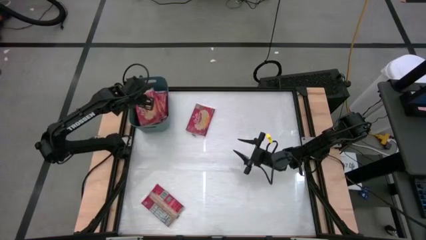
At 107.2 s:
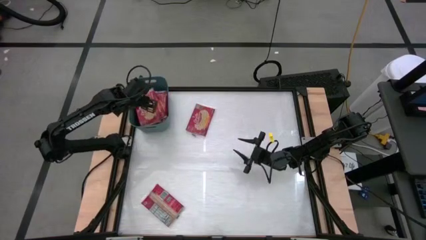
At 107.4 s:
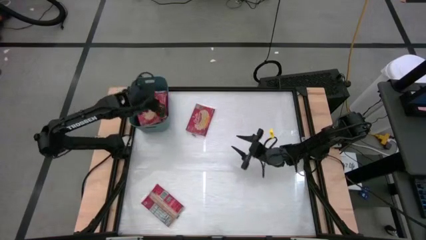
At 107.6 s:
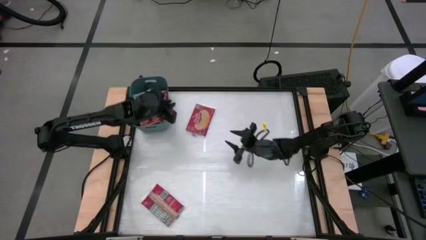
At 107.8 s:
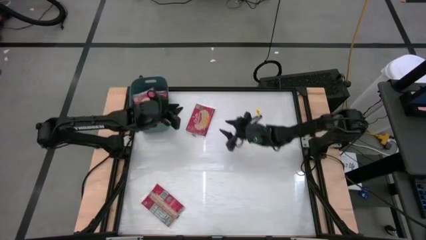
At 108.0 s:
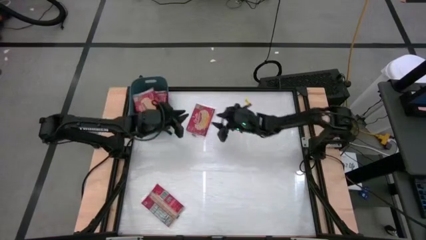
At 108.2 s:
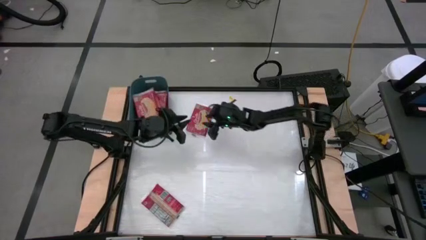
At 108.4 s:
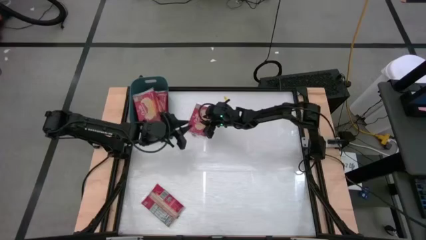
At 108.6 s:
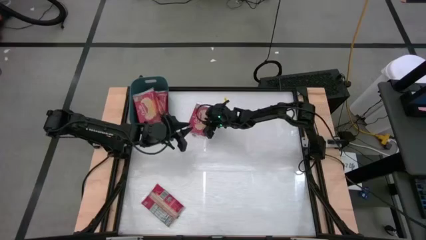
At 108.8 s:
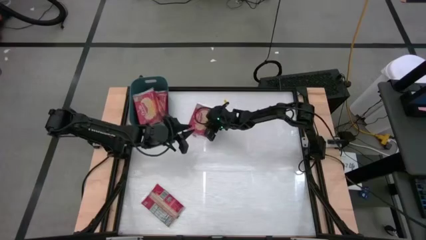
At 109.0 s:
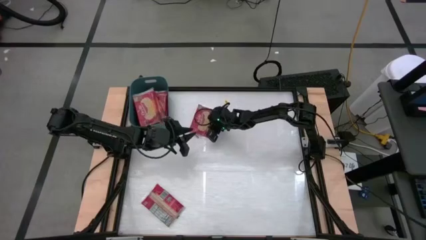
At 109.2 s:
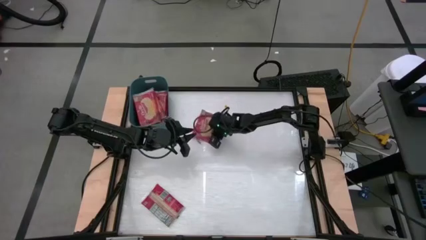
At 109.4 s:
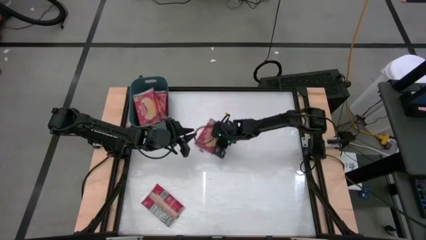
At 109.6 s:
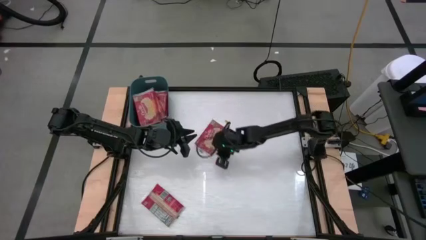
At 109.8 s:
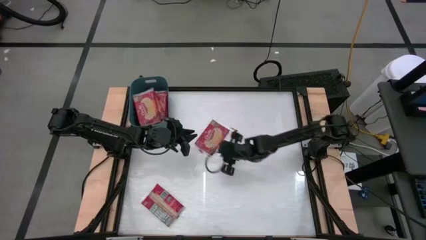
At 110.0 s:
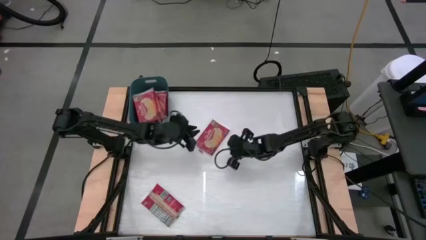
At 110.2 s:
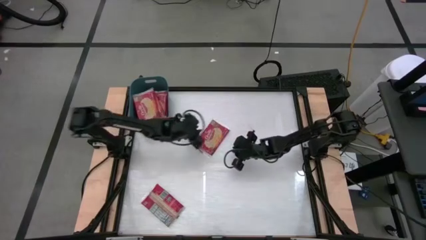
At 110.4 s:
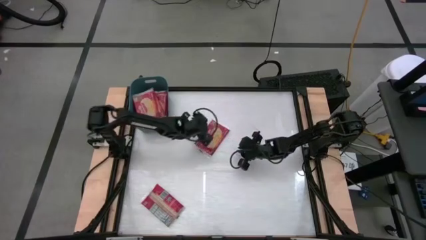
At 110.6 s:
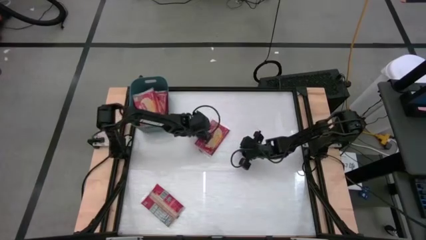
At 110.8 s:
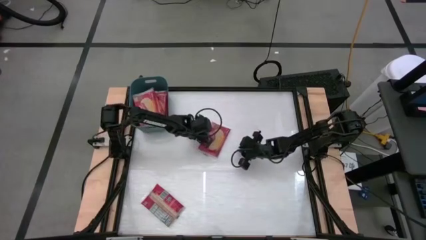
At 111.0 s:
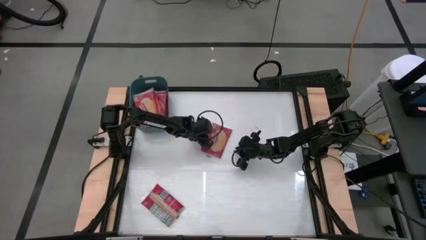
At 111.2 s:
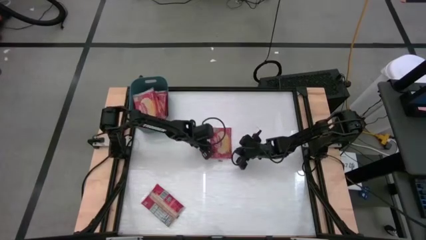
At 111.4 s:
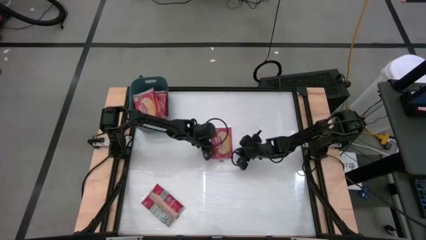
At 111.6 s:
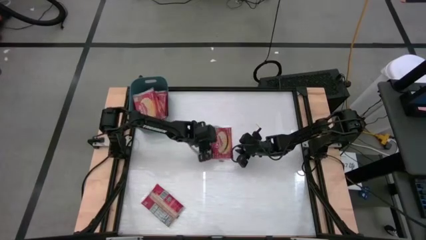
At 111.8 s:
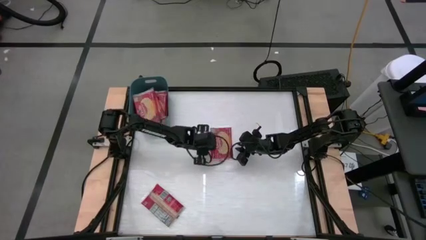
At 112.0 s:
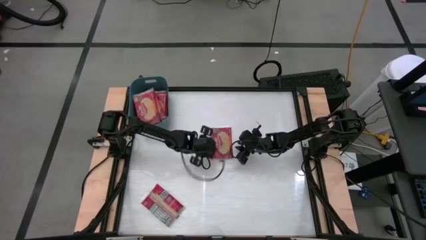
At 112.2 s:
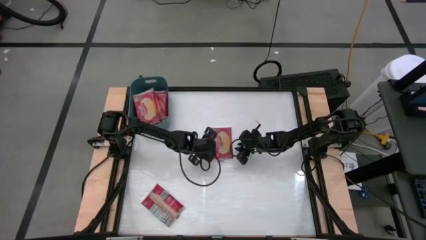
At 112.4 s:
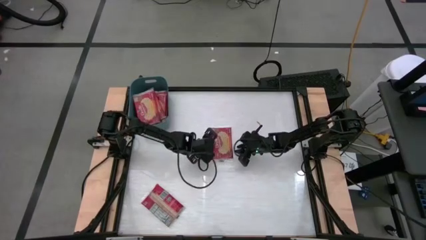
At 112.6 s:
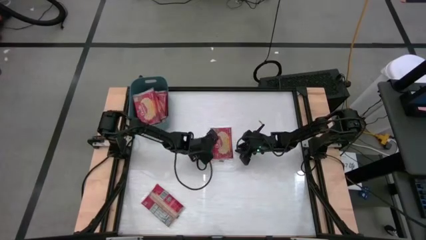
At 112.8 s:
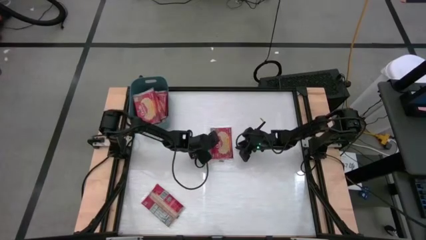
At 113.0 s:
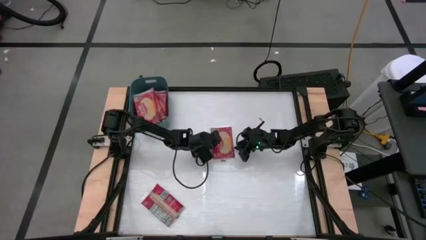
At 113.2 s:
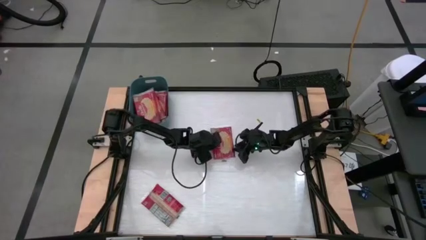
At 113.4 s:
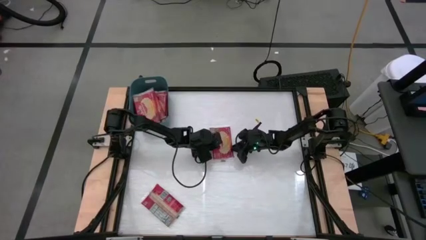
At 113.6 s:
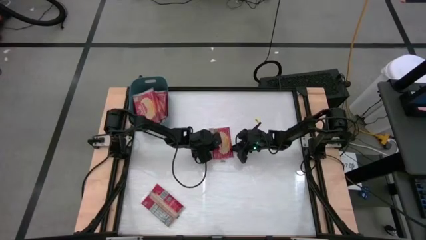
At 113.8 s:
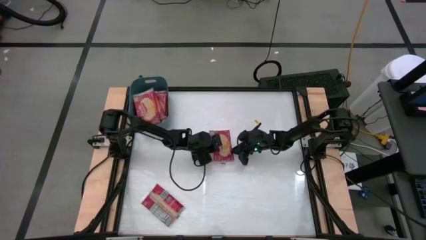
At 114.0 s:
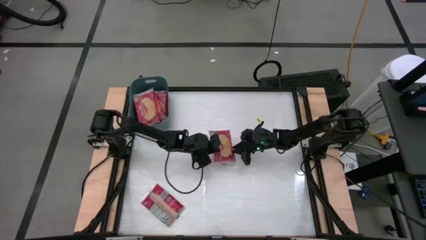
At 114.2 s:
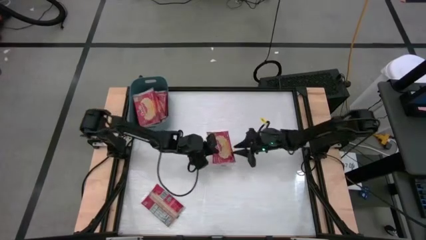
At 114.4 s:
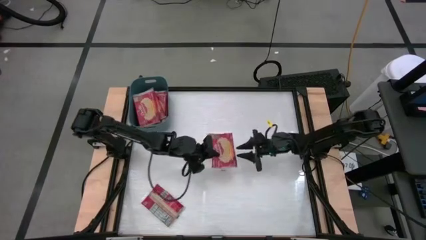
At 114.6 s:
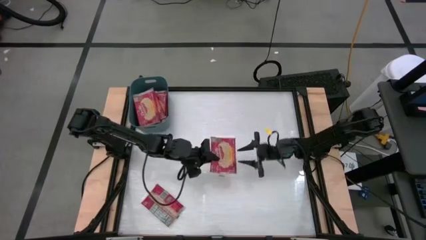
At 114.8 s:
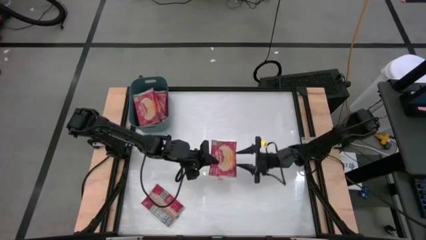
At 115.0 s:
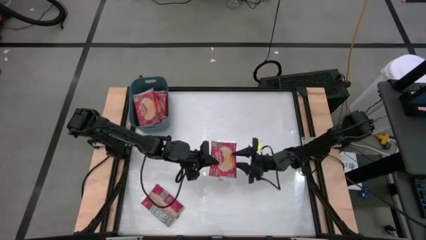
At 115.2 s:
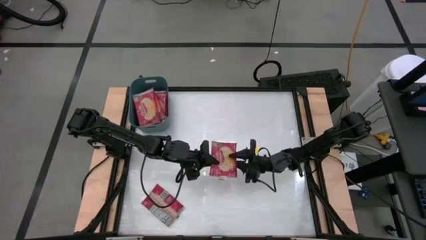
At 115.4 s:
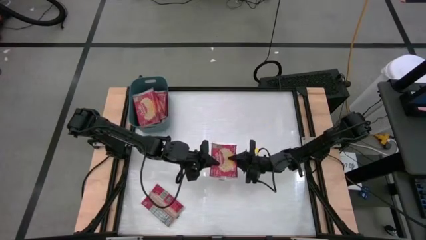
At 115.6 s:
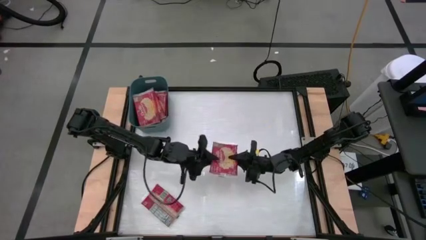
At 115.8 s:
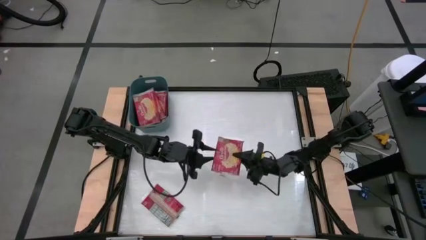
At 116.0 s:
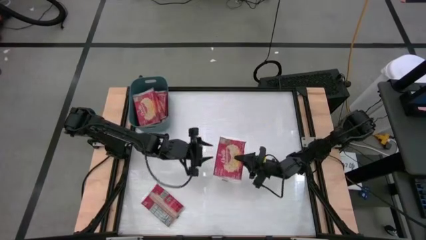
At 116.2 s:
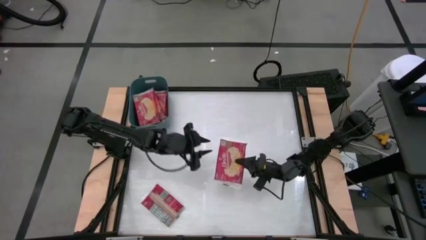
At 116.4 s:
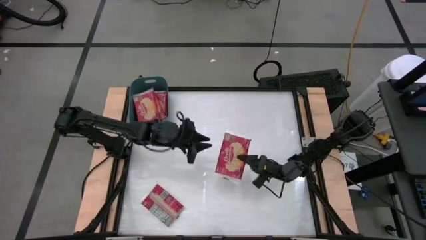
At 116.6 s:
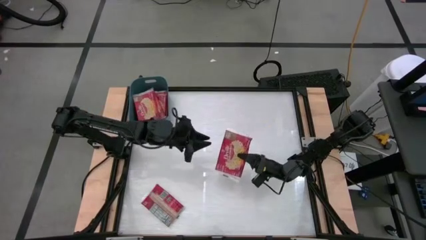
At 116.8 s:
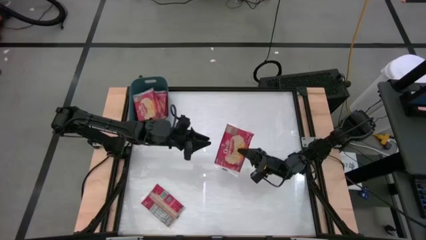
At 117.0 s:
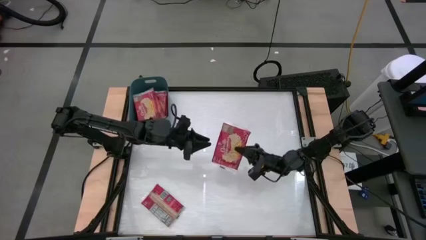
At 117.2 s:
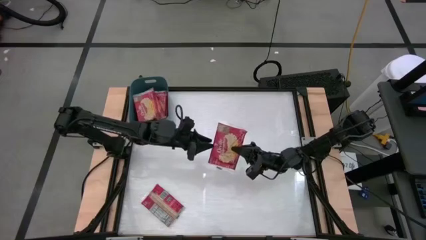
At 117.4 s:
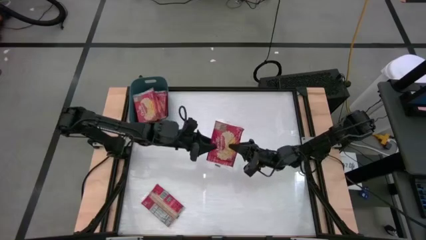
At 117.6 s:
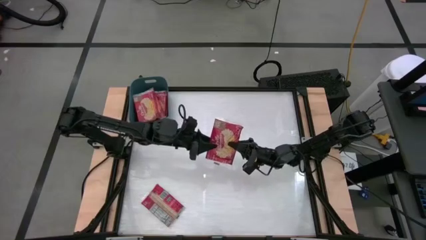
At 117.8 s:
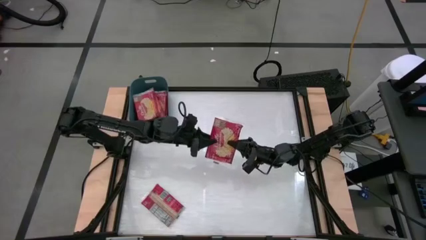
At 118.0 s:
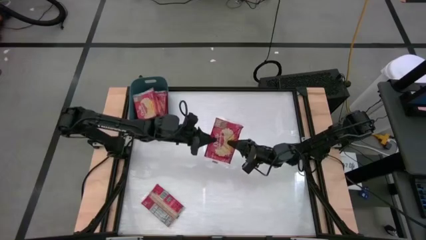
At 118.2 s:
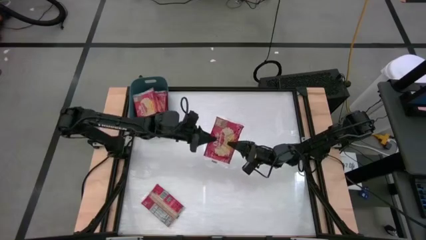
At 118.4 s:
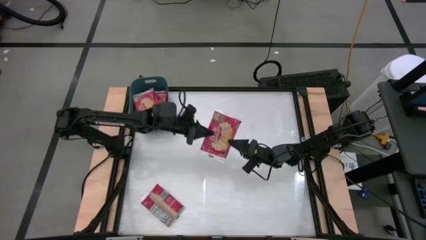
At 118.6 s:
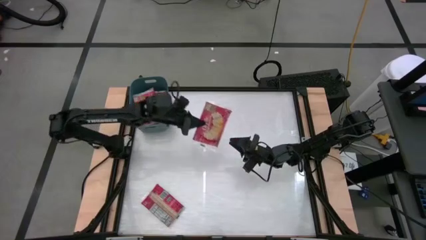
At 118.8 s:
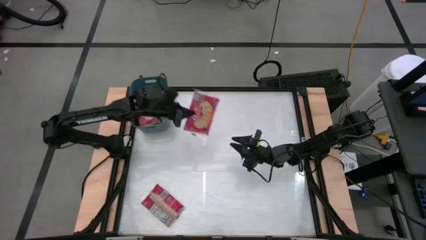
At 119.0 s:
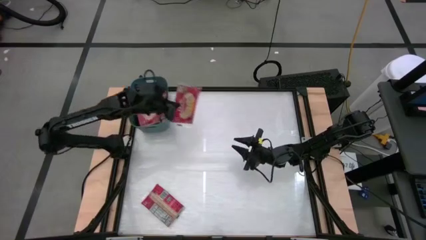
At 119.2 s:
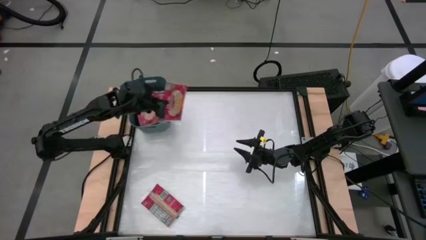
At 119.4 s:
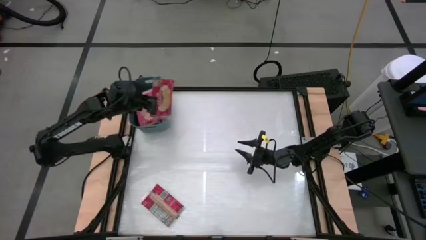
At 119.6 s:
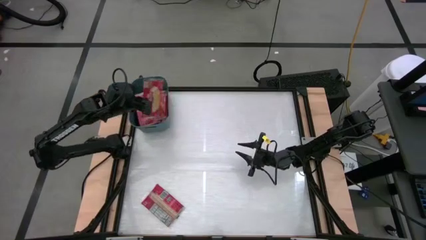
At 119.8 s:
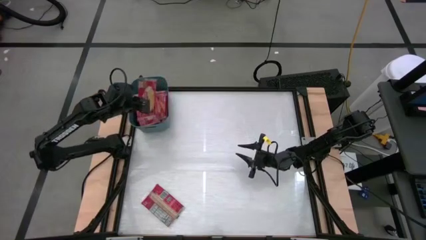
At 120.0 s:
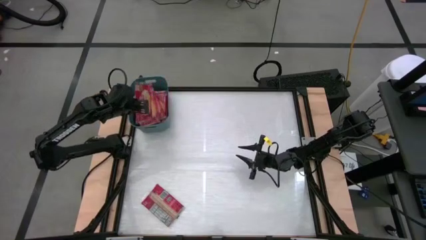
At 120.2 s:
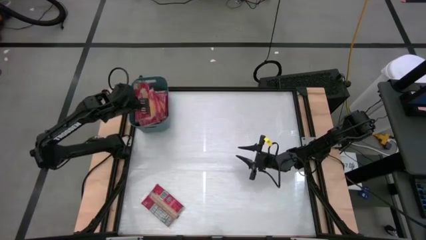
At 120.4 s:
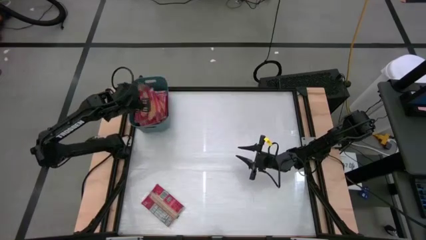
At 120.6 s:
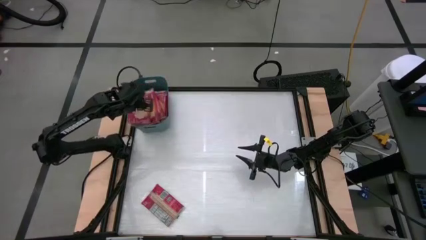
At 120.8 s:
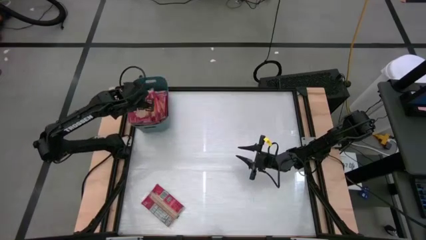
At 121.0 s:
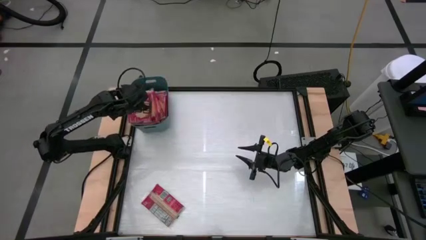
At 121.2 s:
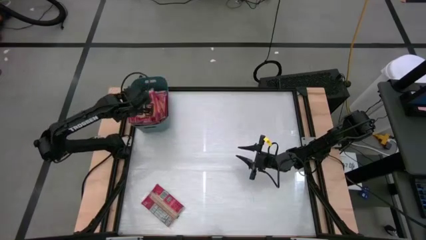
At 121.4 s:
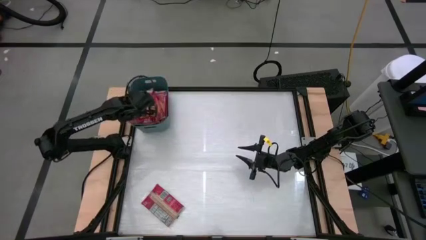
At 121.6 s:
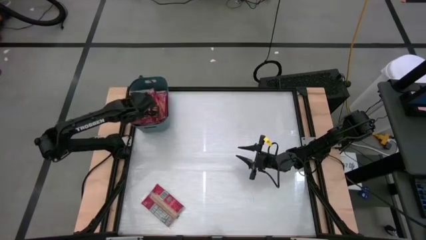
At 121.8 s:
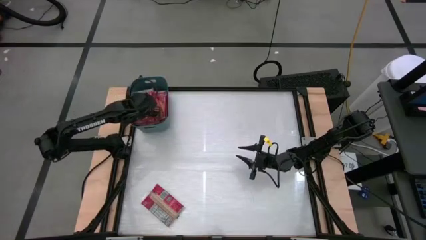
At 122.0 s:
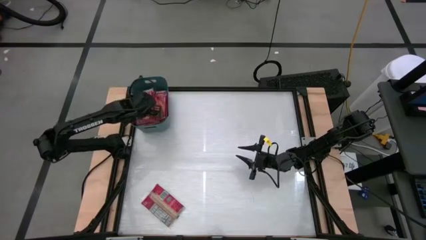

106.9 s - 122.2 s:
Task: Sort popcorn bags into baskets
Stack the red popcorn bag on top of the other red popcorn bag into the blue bin

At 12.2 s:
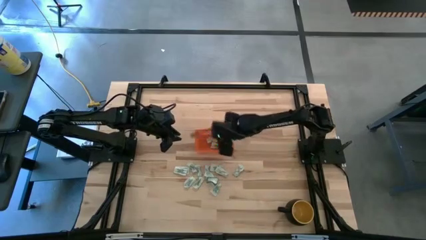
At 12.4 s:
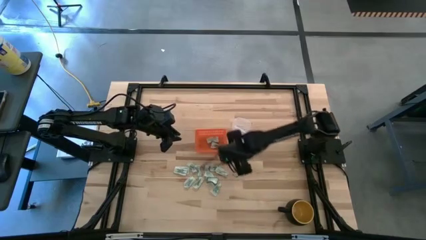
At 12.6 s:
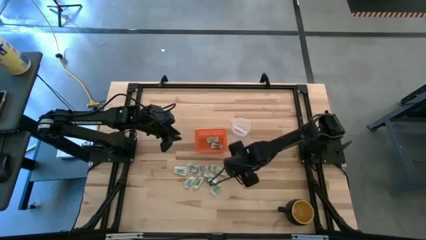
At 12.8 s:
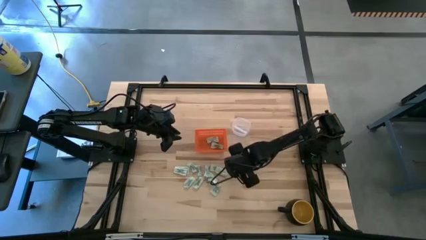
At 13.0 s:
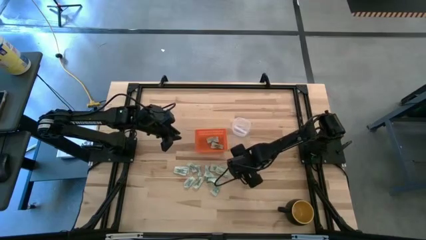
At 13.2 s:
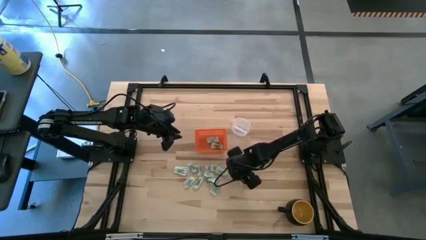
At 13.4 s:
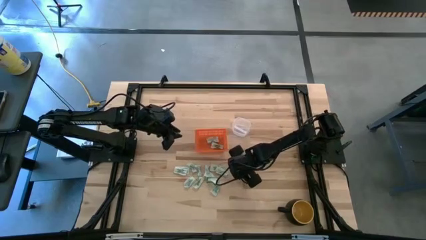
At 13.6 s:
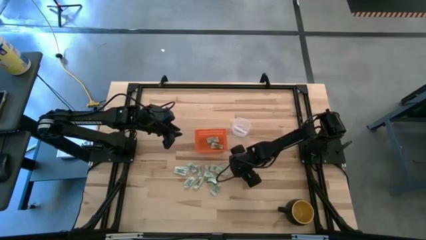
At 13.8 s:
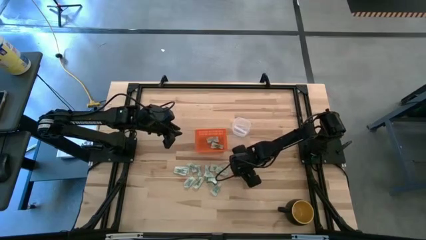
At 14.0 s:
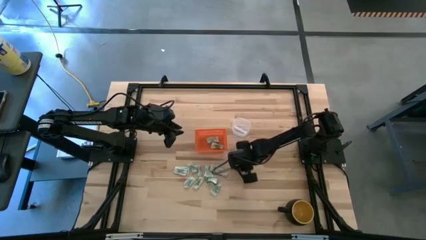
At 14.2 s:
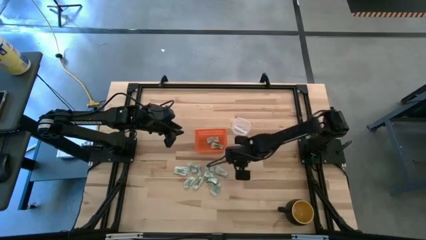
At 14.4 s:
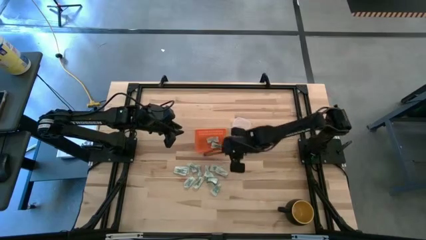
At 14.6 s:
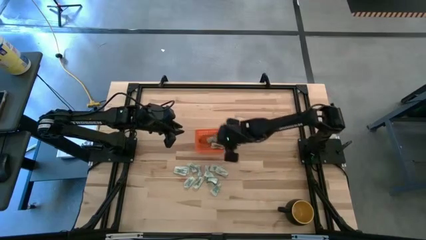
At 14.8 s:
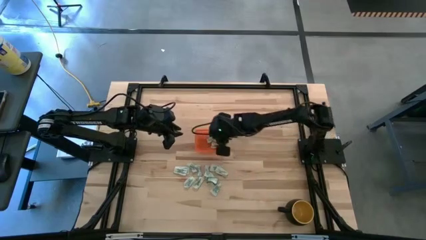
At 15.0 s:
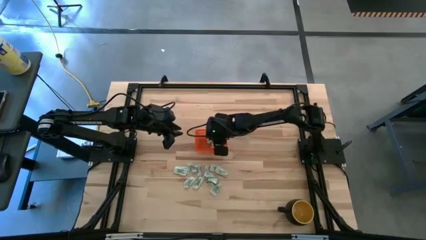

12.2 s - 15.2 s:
Task: Pick and place Stevia / Truvia into bins
Put the stevia packet into the basket
